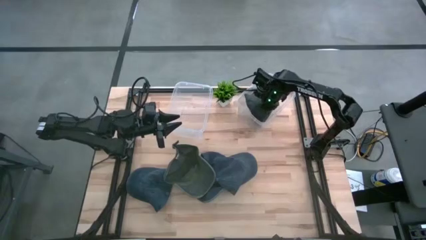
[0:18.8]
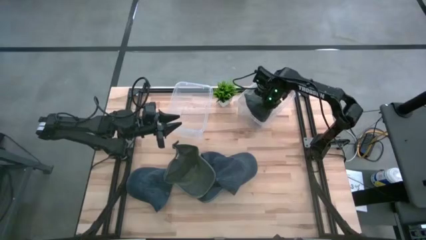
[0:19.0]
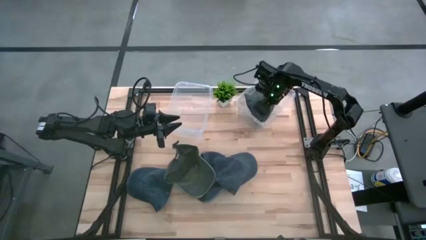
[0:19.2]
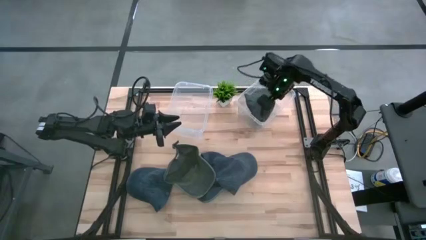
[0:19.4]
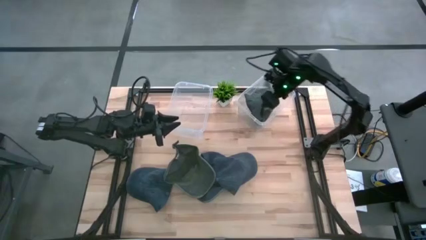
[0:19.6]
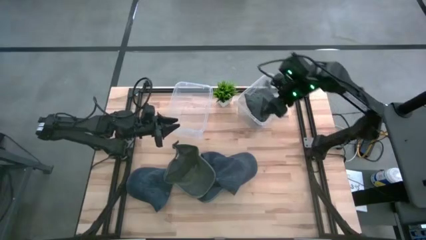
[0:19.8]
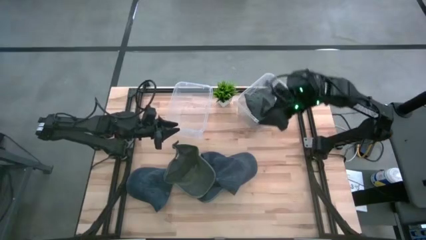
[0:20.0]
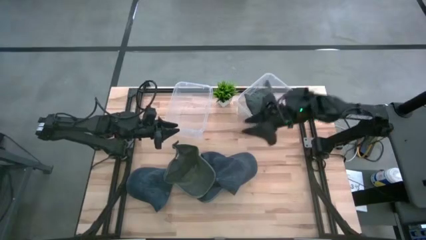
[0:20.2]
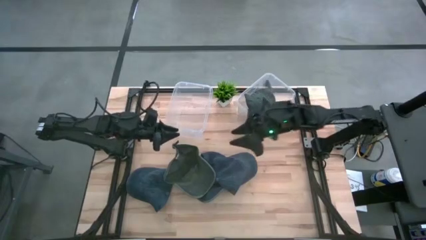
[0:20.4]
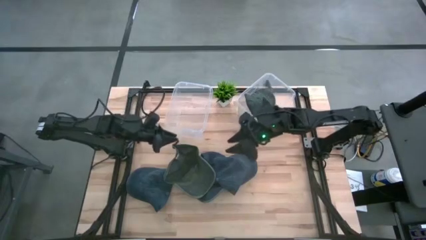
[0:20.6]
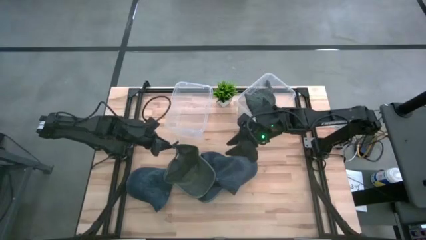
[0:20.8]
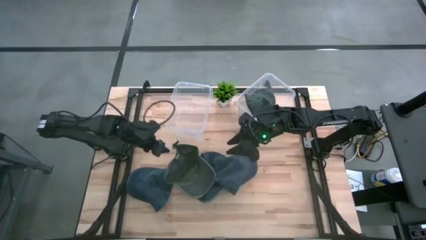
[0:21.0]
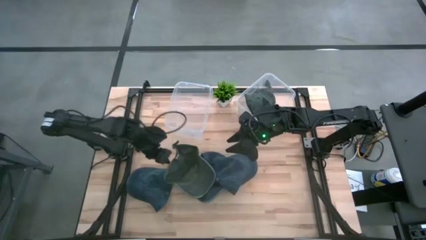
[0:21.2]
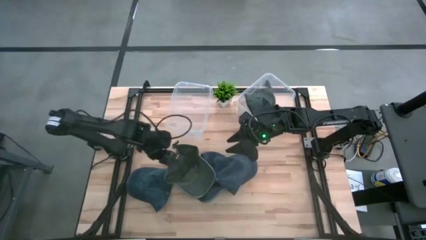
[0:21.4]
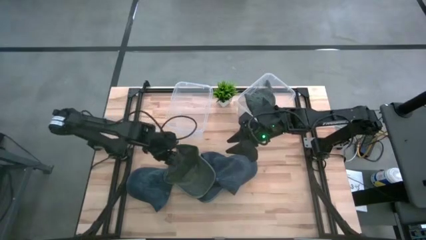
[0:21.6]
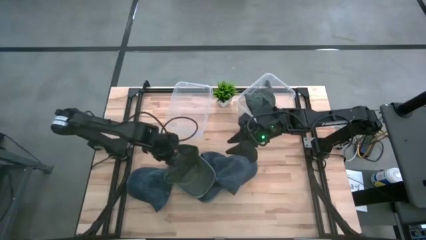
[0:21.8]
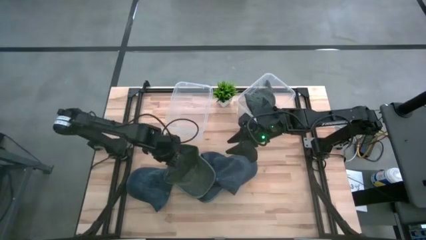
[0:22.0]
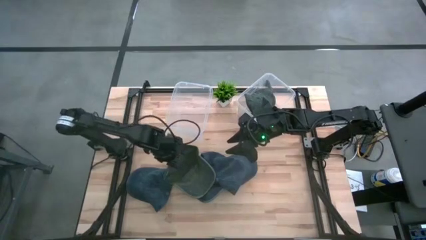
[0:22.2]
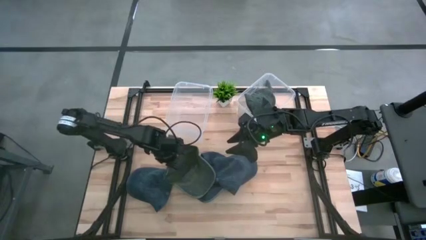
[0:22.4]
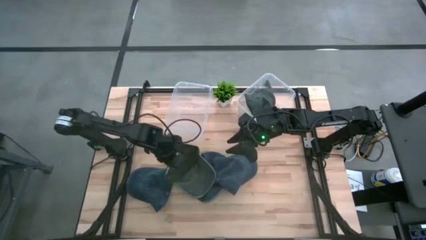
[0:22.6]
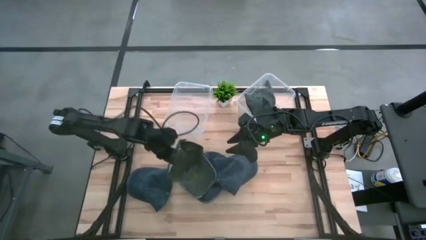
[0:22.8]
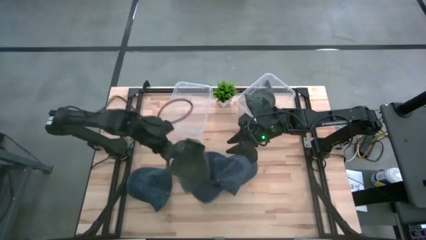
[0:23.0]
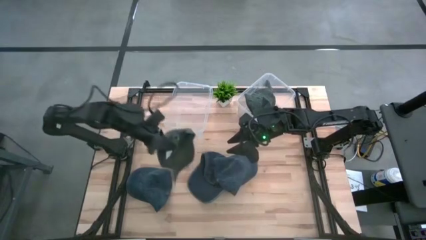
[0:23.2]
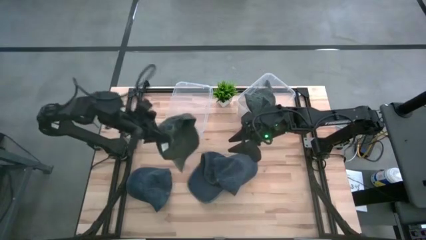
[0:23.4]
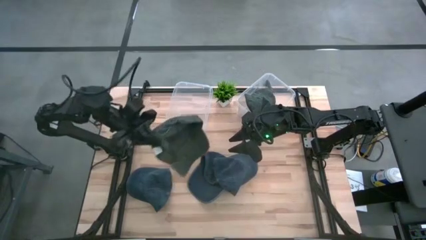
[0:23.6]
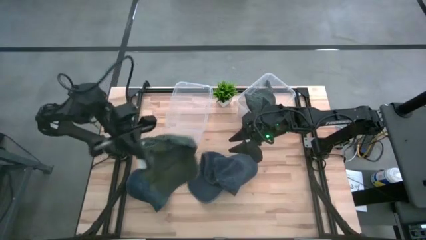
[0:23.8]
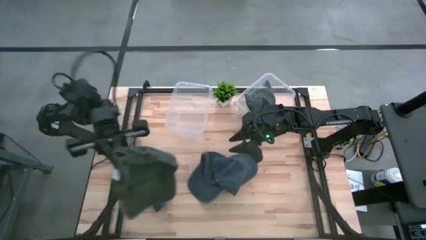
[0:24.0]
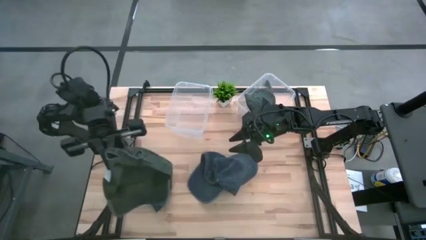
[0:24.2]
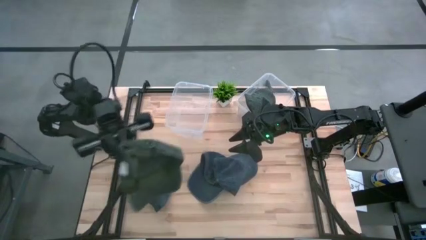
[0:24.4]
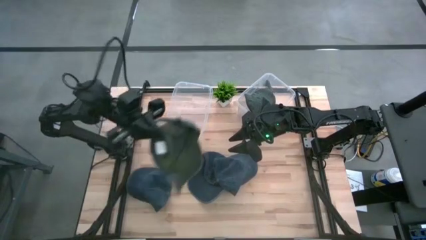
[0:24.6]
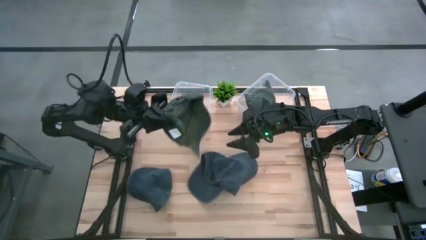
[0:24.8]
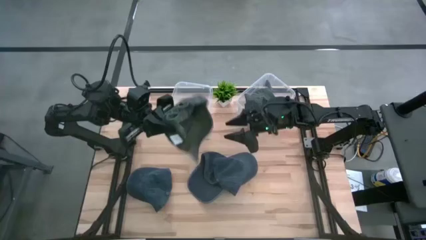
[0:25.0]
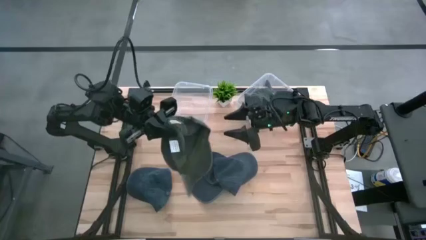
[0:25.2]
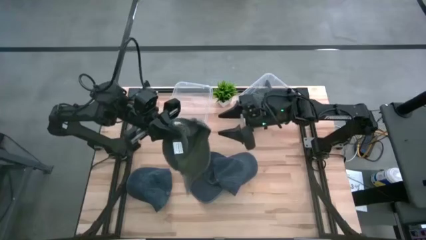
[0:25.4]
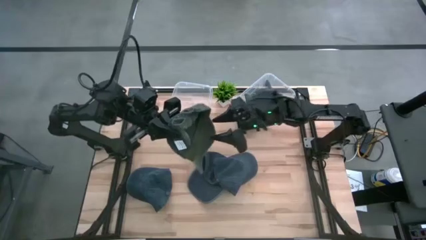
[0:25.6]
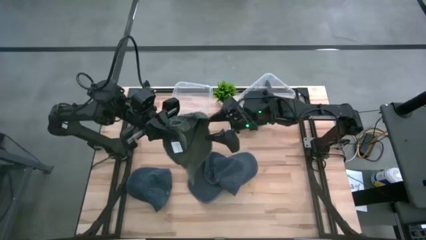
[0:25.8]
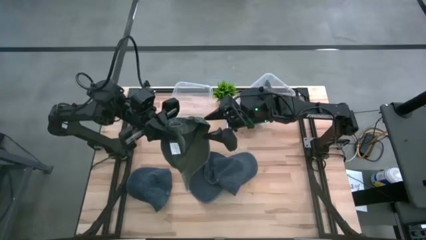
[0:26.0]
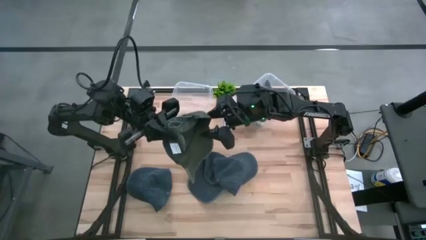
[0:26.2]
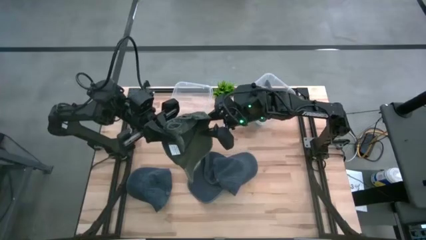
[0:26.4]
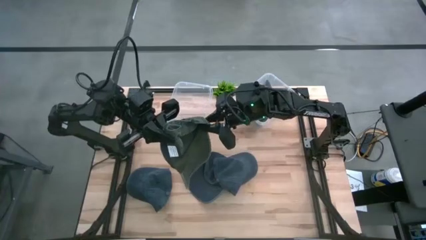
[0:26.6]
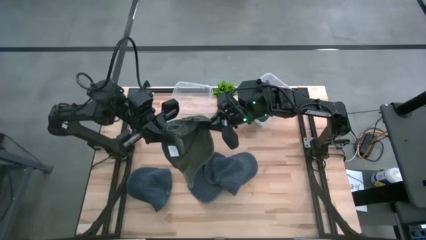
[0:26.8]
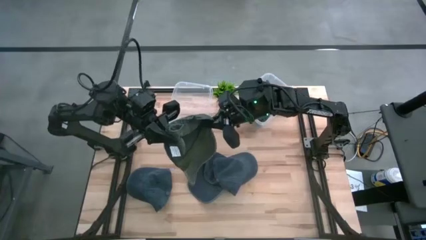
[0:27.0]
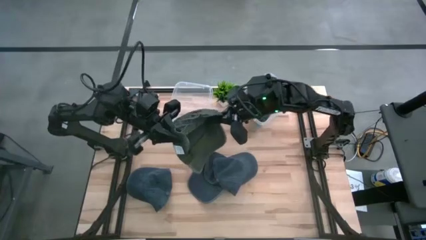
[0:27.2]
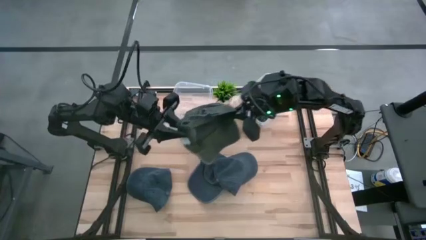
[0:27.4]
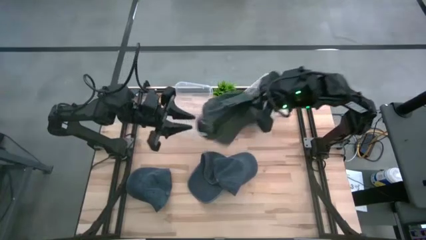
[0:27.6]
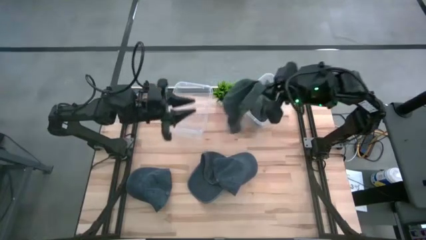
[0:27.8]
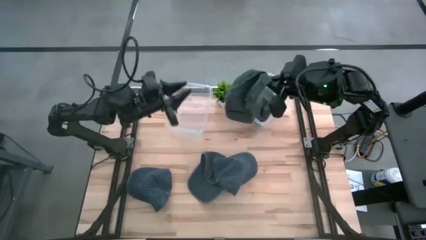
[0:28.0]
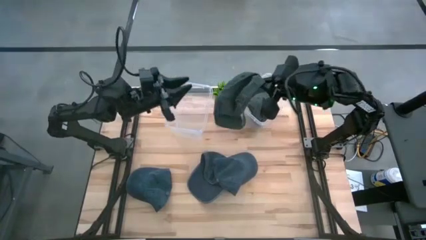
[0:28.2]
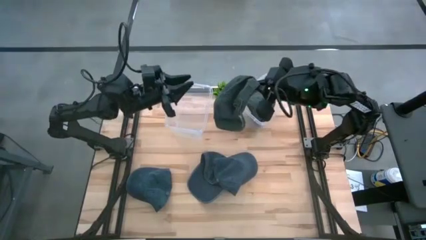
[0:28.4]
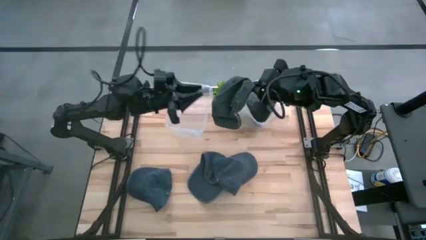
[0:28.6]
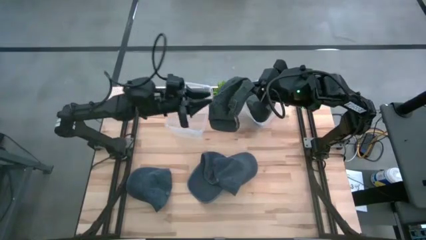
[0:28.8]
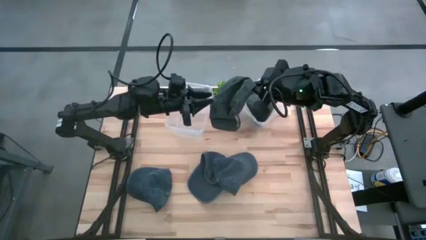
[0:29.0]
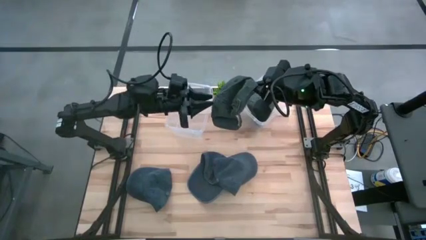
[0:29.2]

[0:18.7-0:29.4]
Task: Pick & Place hat
Put the green cap in the right transparent bin
